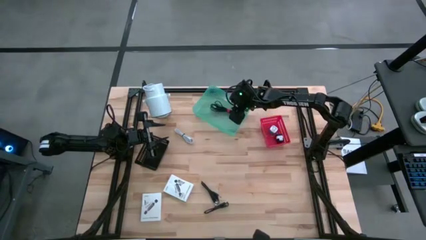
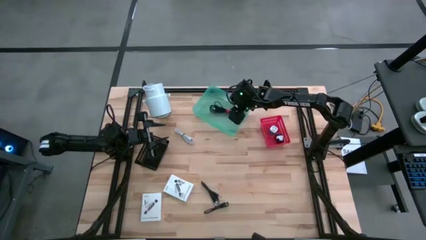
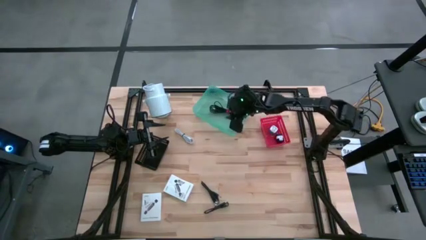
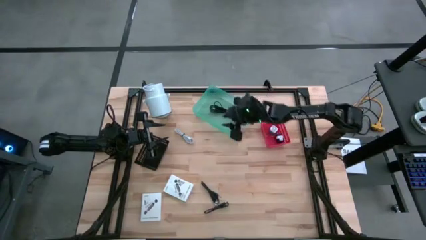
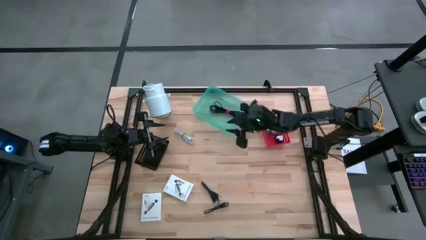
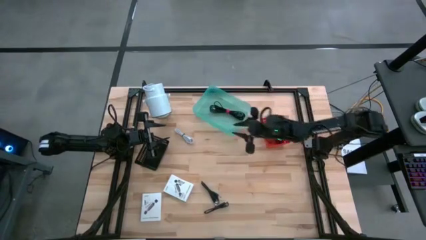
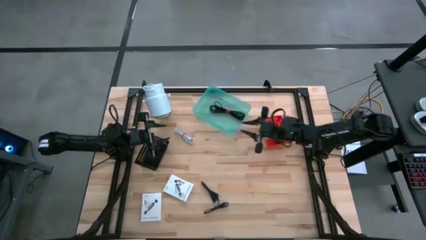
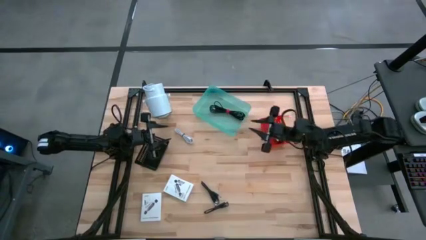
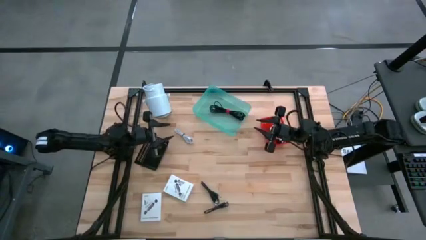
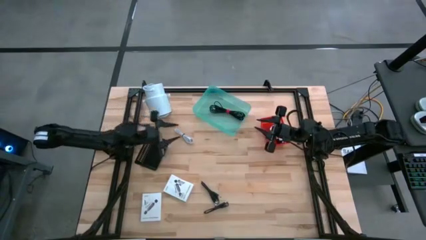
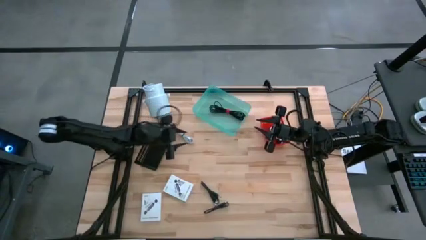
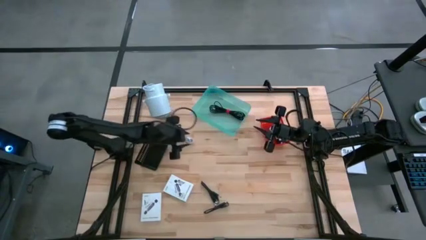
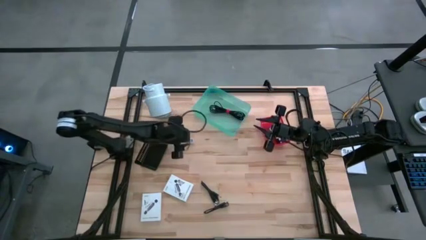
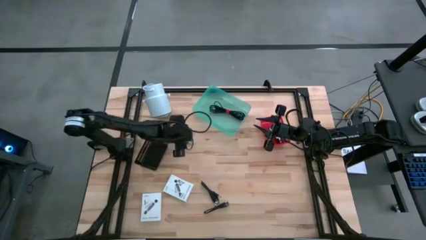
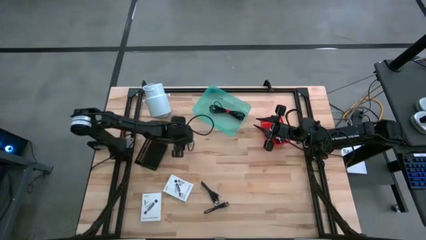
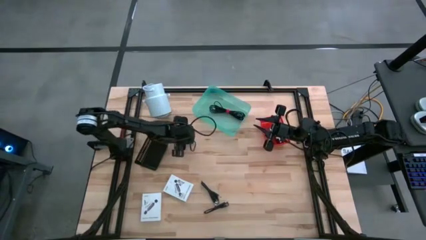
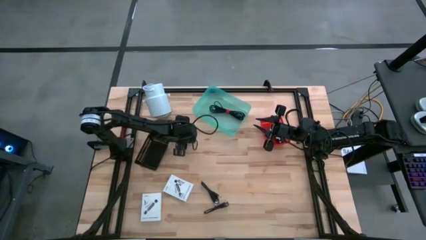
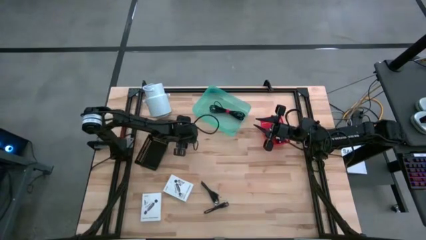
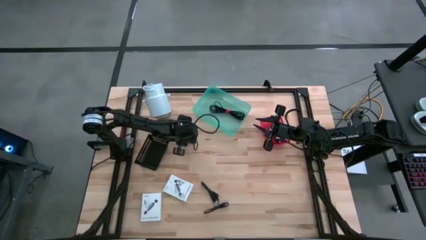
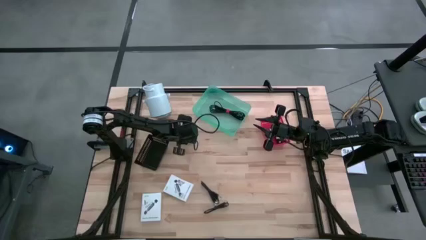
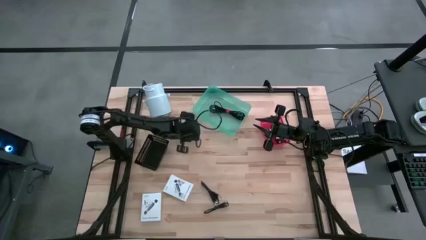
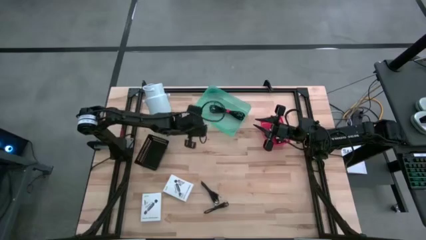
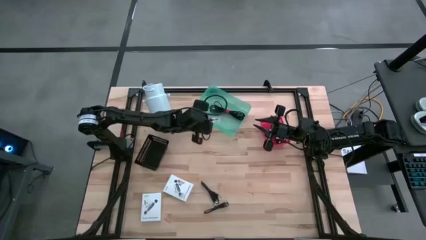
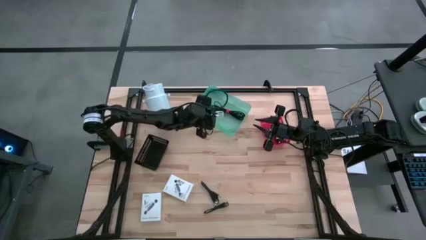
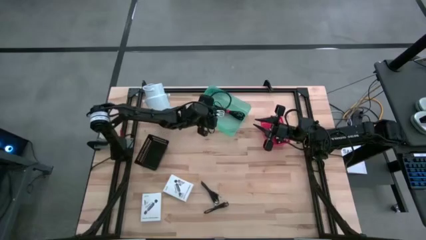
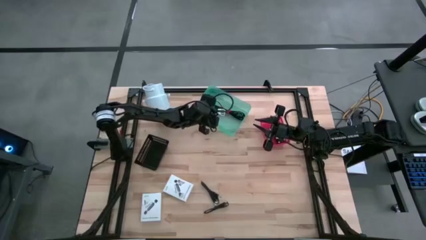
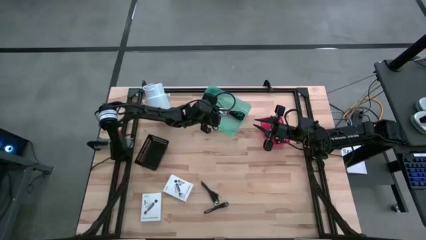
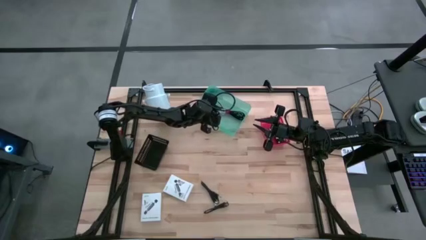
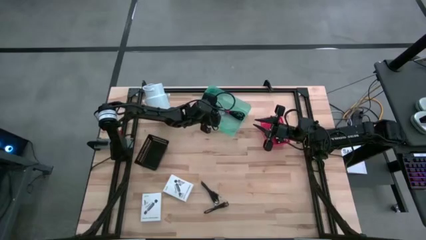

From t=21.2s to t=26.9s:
Task: Pick and place items into bin
Put the white charger cable into the green bin

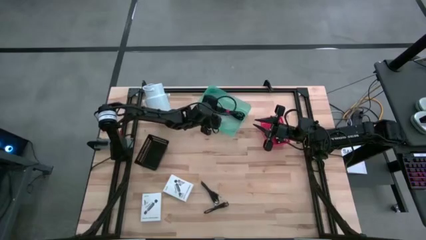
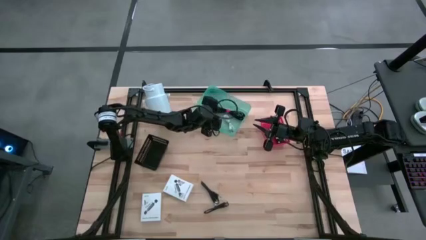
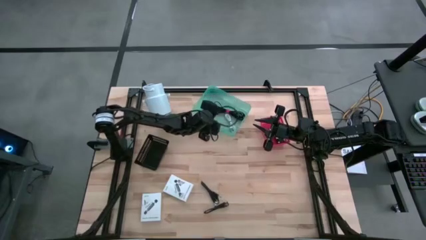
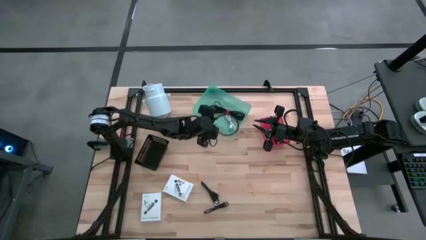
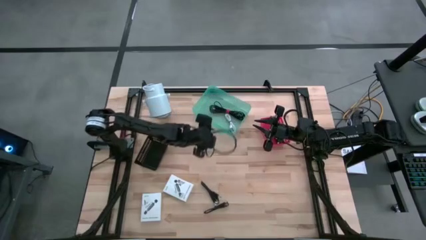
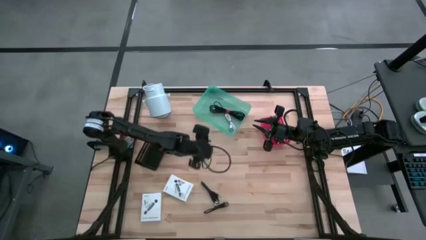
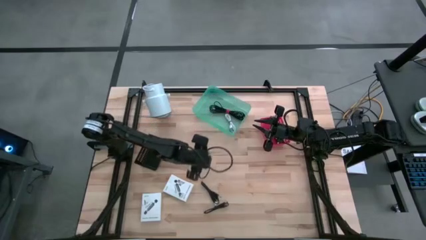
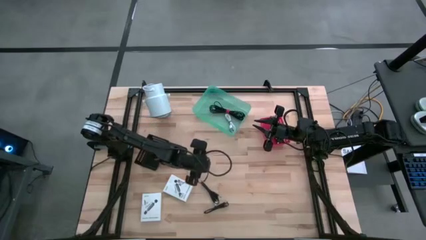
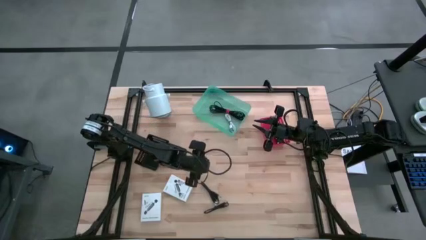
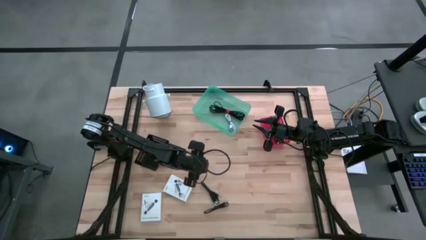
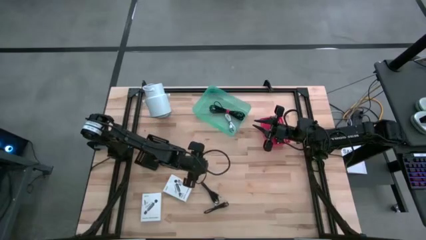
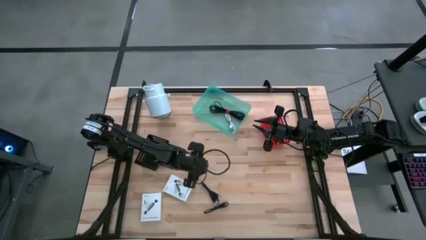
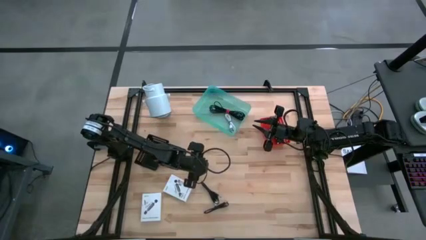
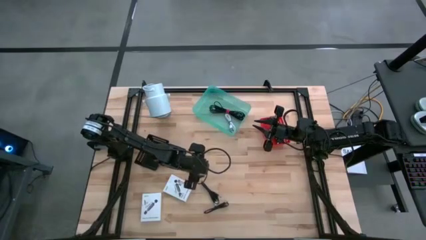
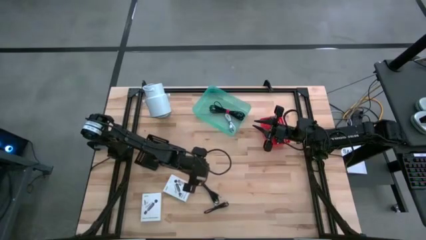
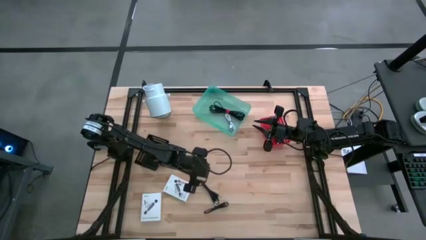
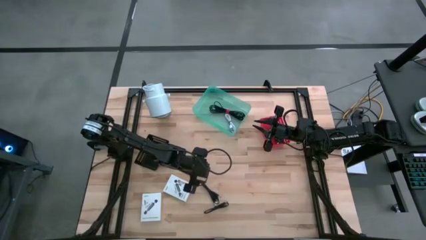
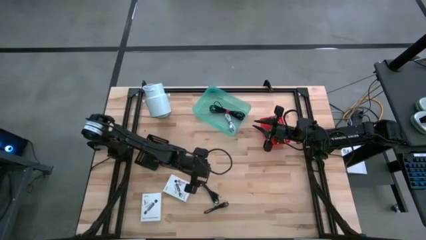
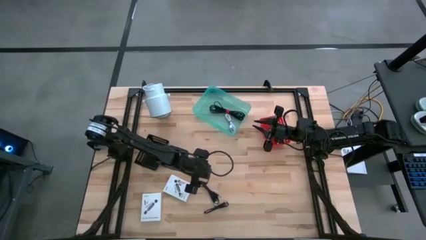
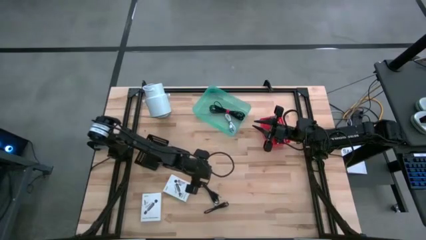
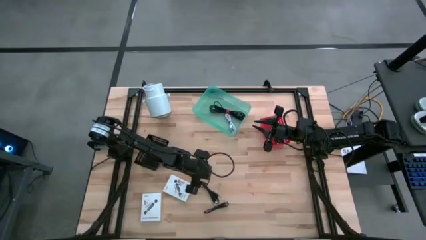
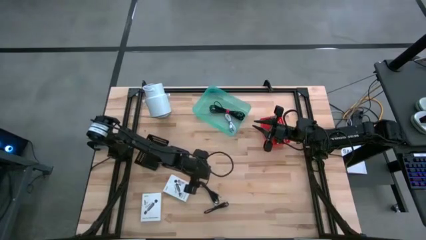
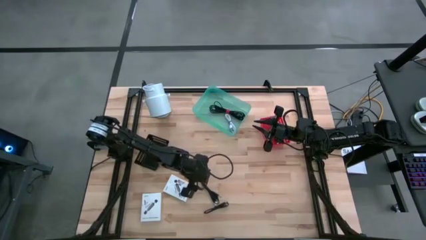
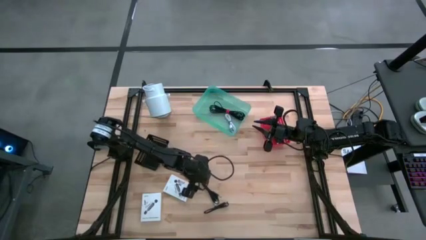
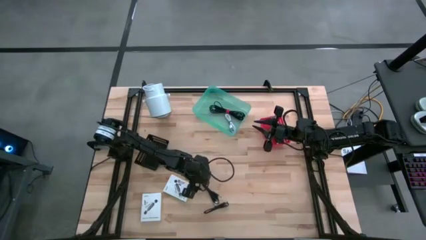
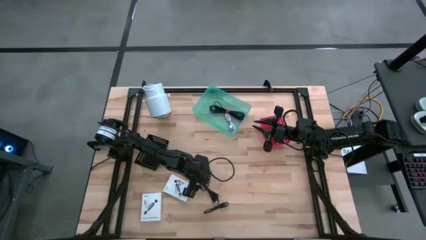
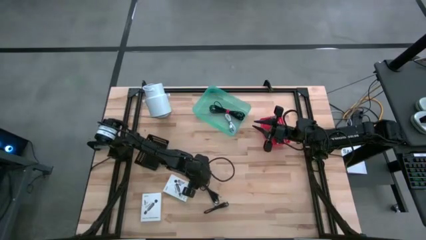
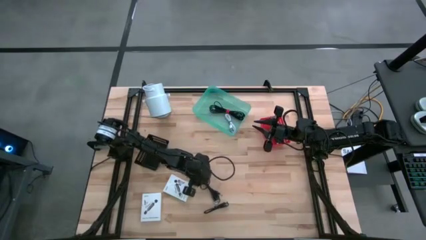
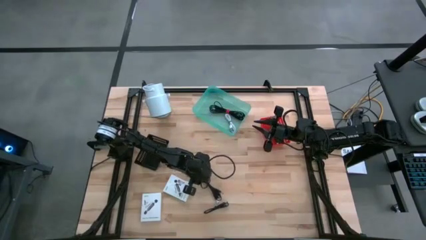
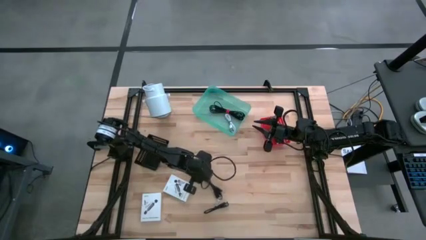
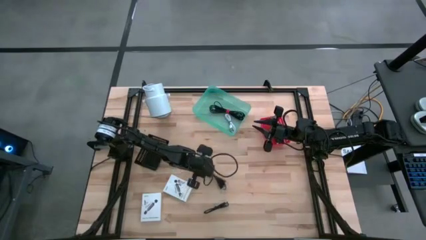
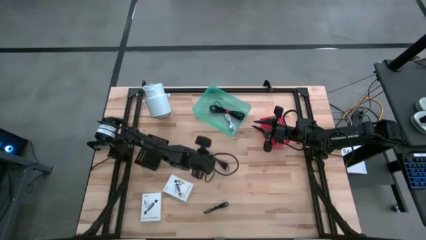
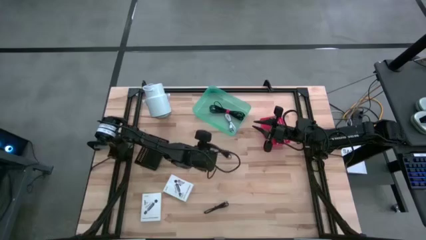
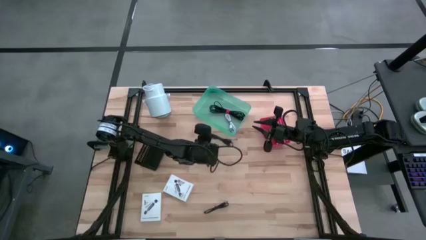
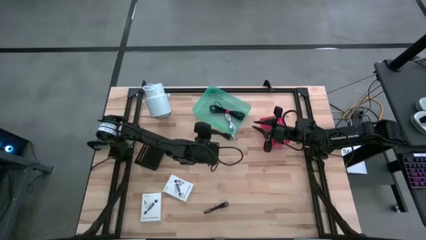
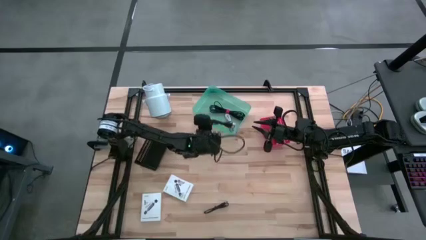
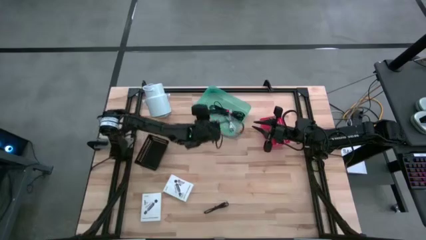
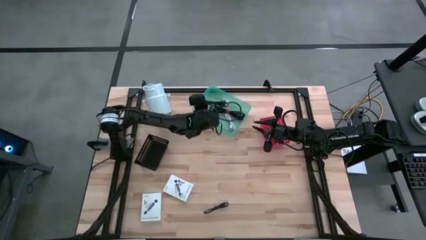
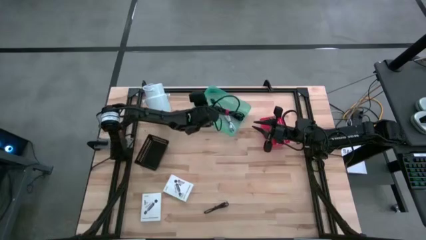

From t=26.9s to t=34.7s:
Put the top black charger cable into the green bin

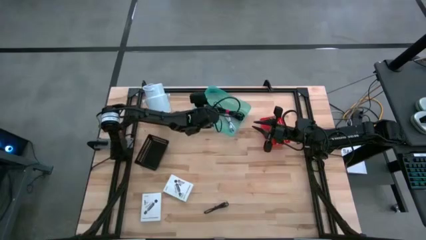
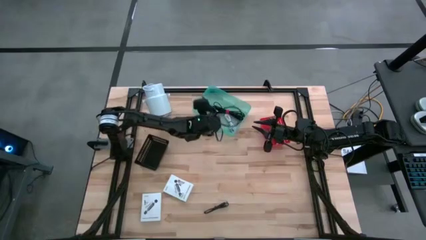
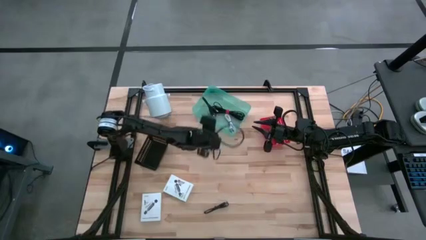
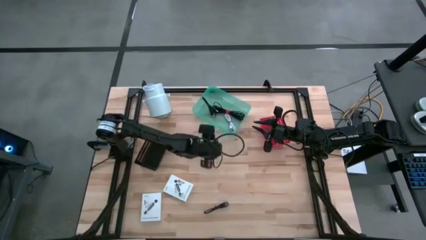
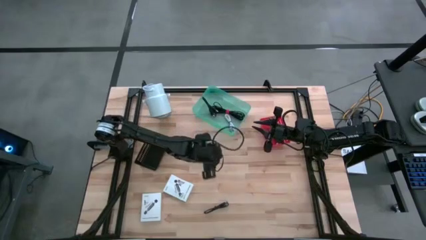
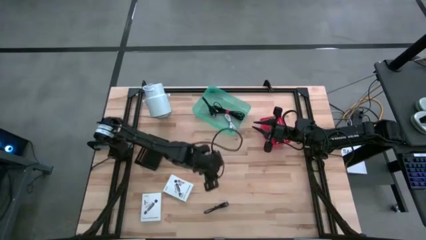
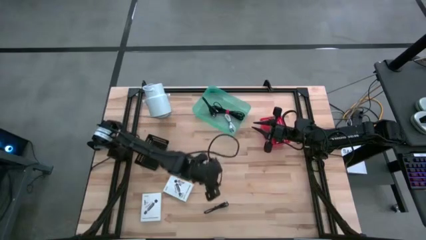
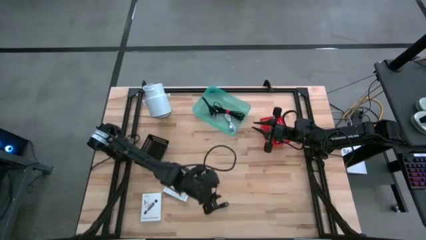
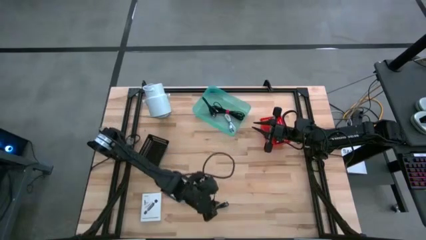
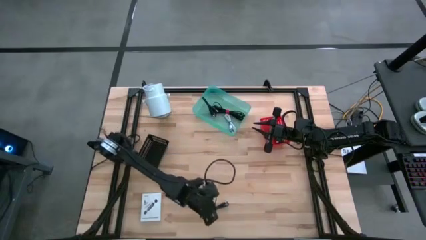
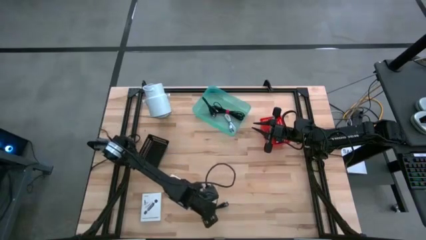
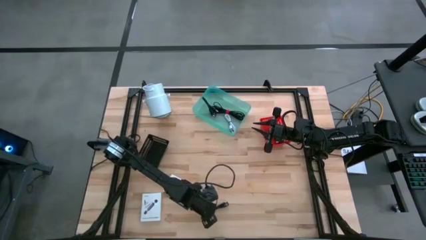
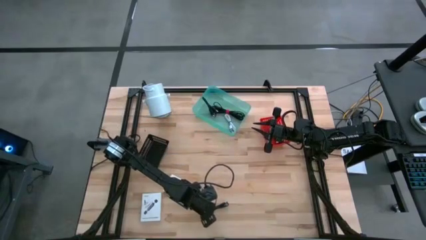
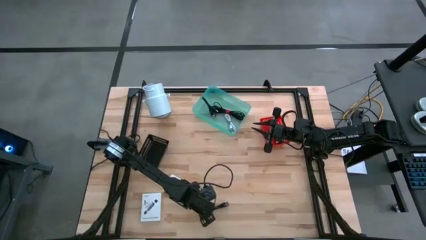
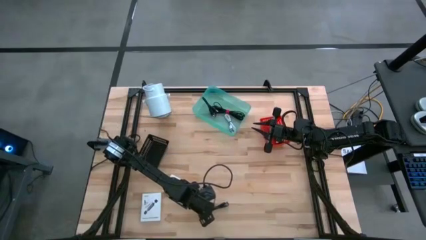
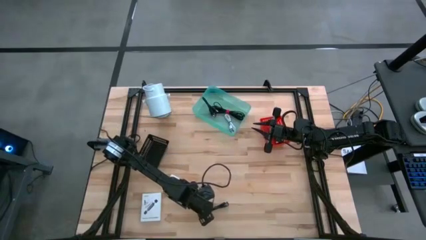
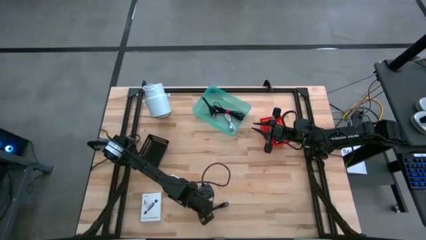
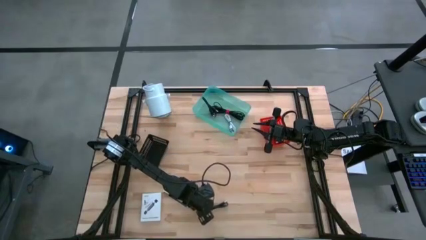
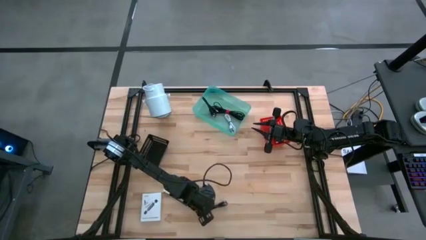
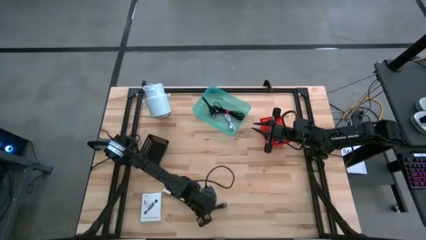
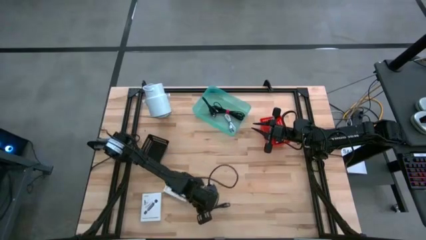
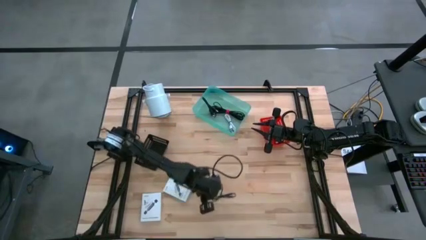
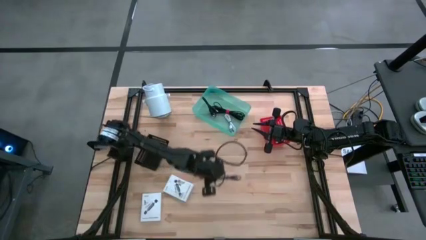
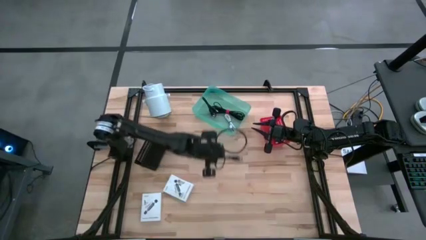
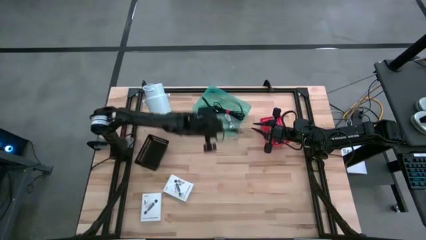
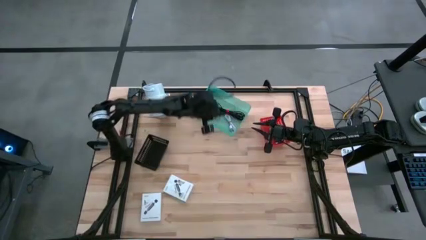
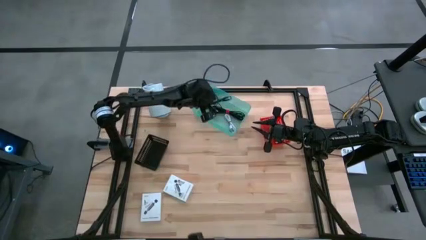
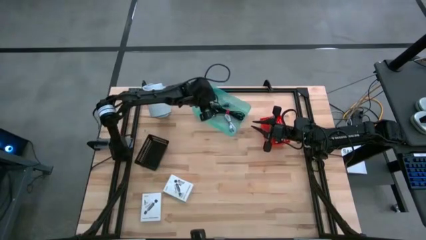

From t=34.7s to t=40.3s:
Put the black charger cable in the green bin
